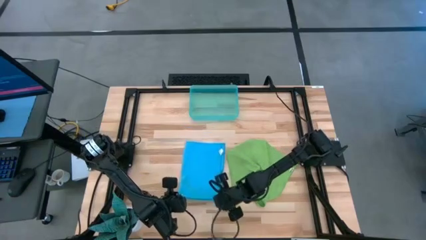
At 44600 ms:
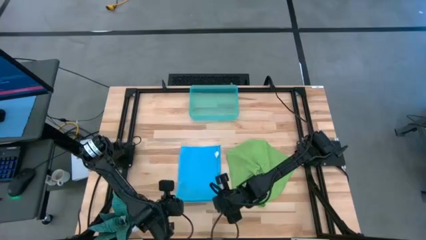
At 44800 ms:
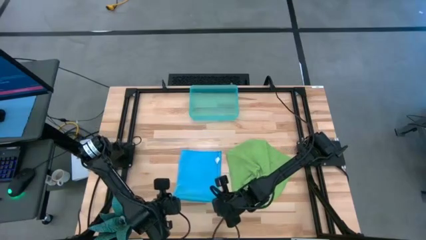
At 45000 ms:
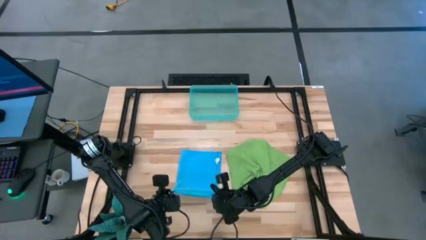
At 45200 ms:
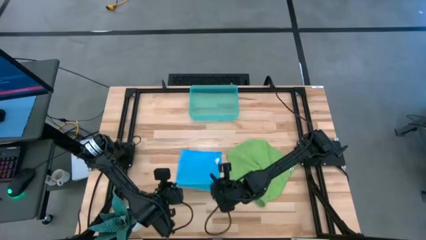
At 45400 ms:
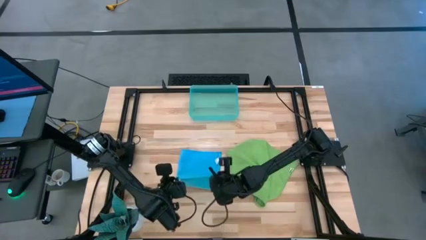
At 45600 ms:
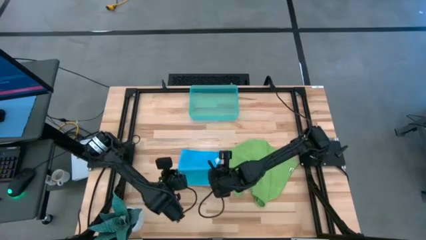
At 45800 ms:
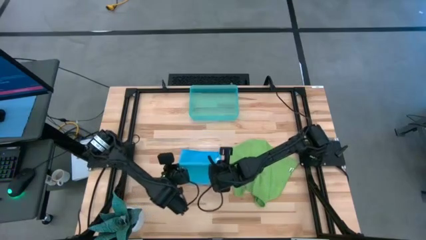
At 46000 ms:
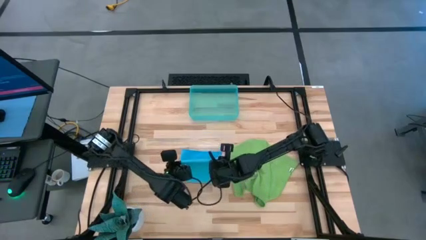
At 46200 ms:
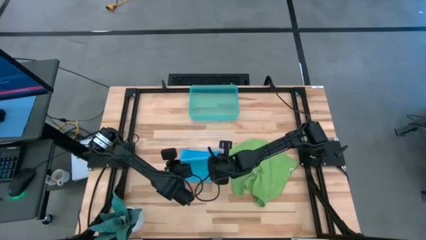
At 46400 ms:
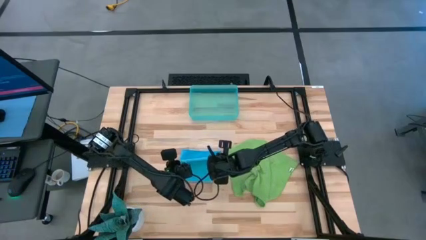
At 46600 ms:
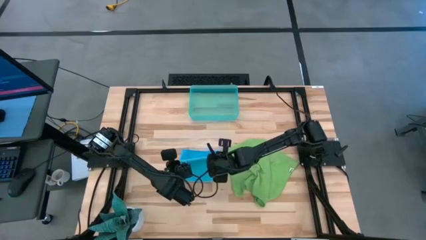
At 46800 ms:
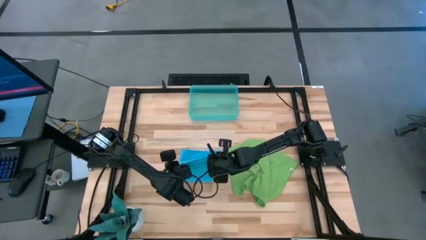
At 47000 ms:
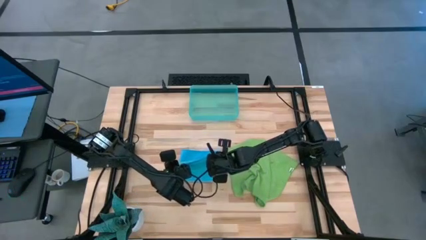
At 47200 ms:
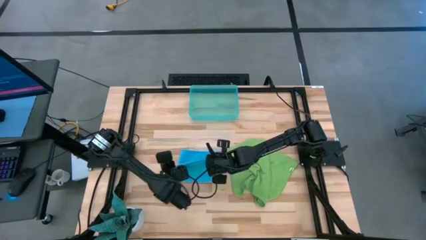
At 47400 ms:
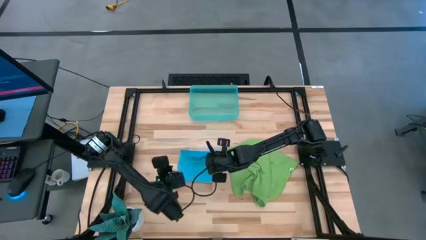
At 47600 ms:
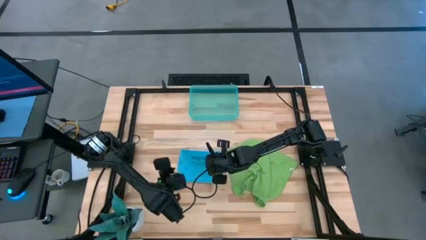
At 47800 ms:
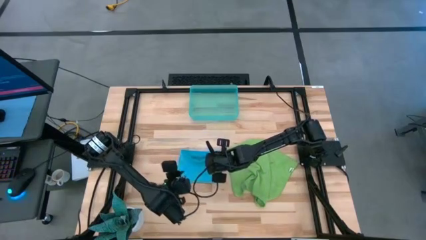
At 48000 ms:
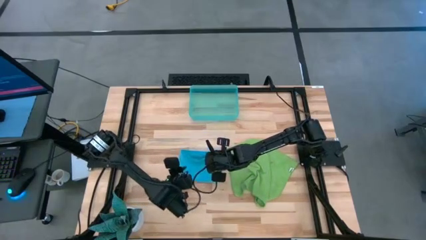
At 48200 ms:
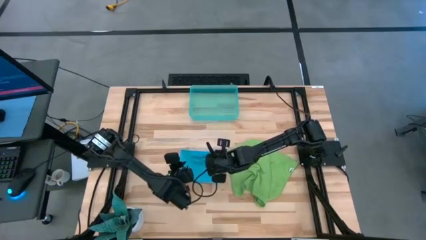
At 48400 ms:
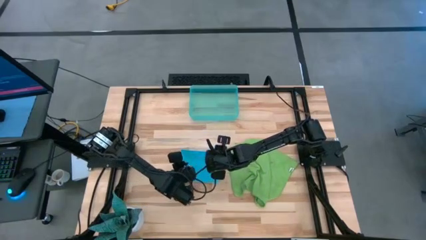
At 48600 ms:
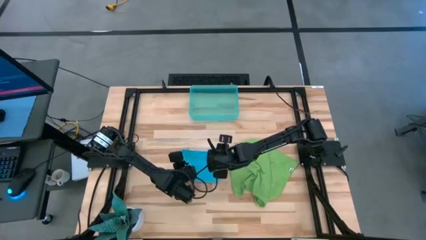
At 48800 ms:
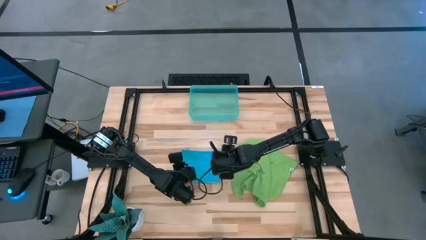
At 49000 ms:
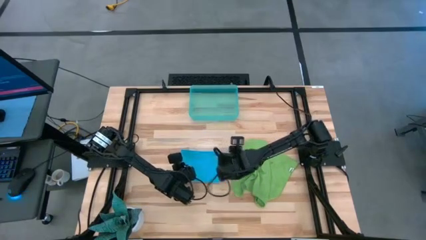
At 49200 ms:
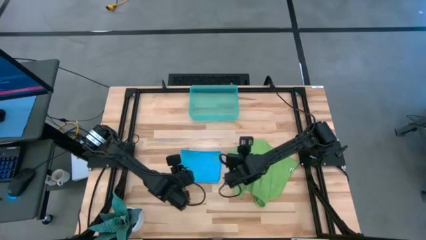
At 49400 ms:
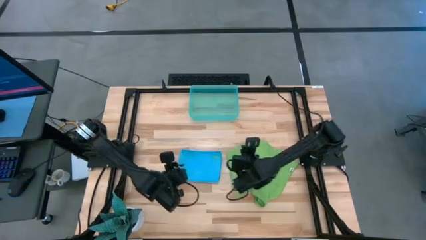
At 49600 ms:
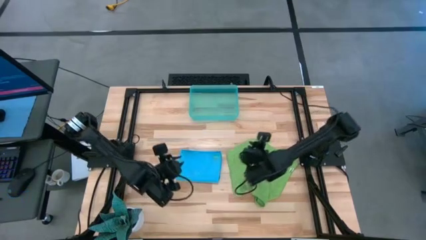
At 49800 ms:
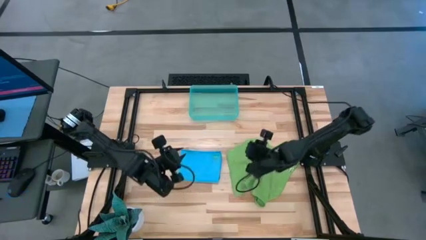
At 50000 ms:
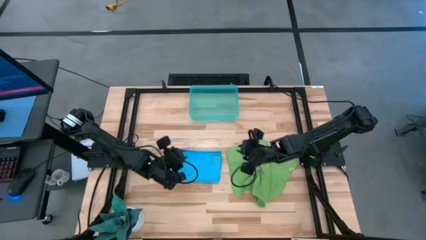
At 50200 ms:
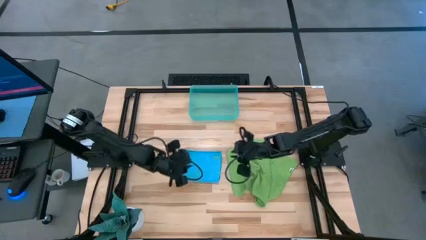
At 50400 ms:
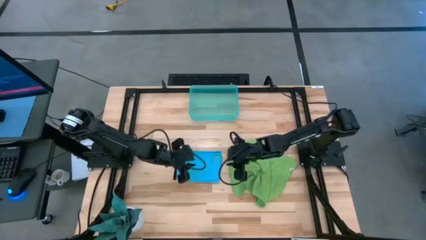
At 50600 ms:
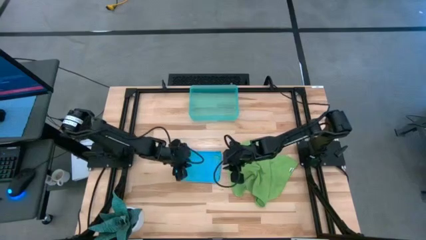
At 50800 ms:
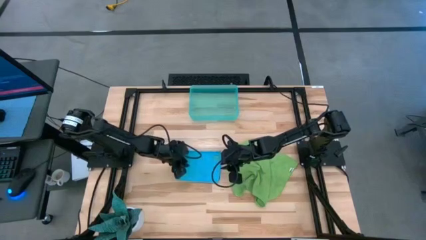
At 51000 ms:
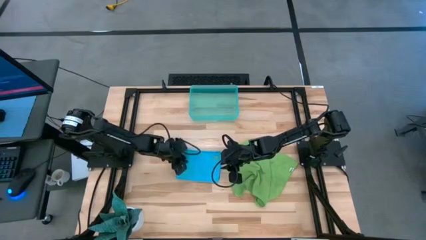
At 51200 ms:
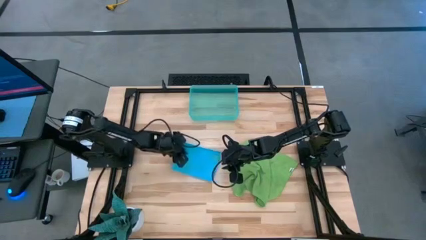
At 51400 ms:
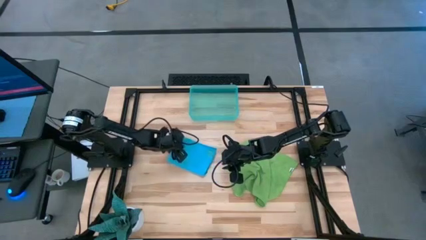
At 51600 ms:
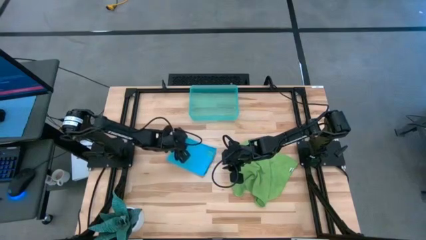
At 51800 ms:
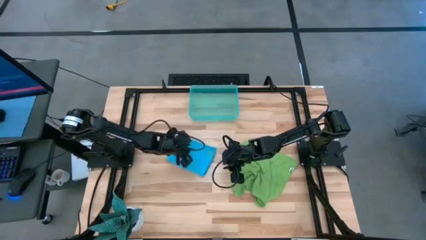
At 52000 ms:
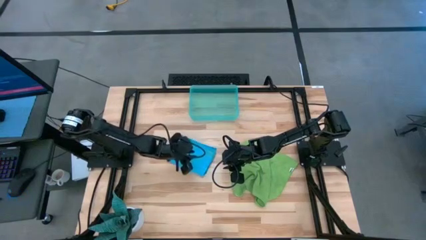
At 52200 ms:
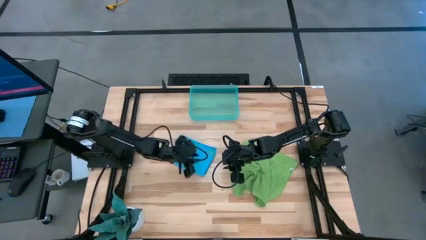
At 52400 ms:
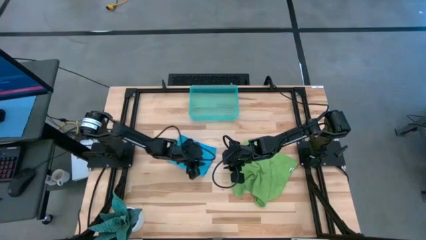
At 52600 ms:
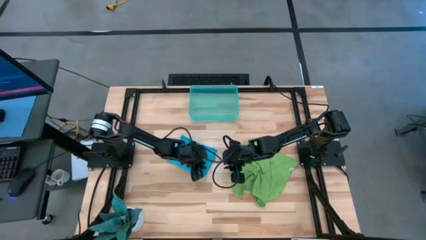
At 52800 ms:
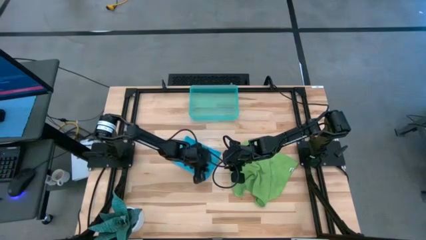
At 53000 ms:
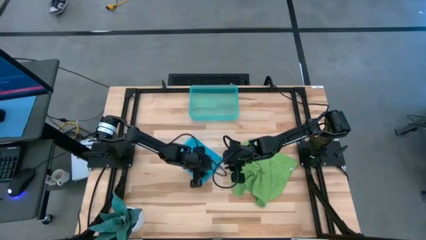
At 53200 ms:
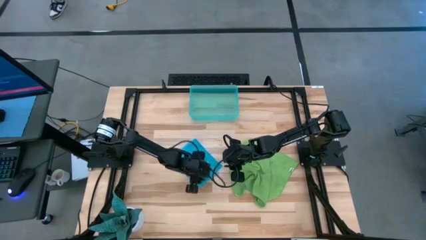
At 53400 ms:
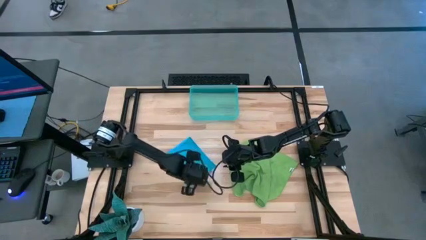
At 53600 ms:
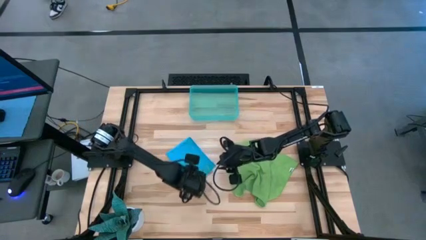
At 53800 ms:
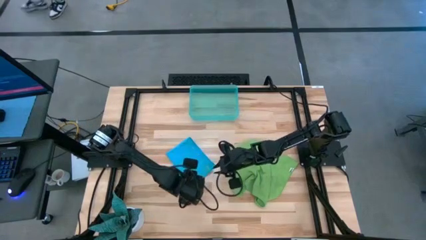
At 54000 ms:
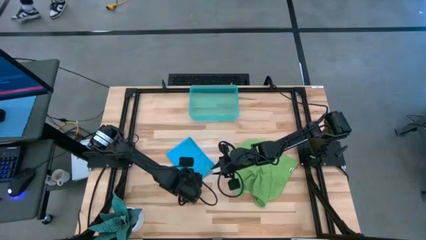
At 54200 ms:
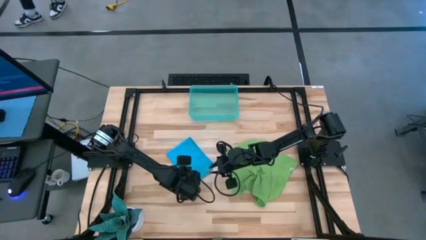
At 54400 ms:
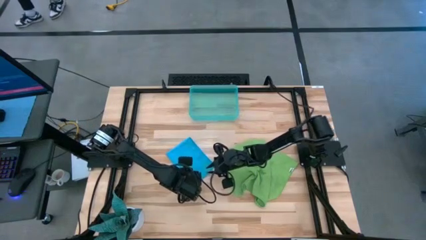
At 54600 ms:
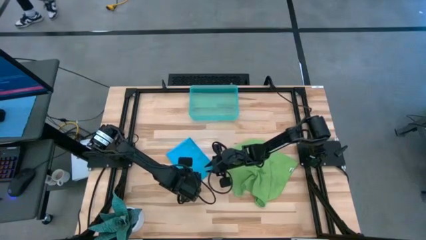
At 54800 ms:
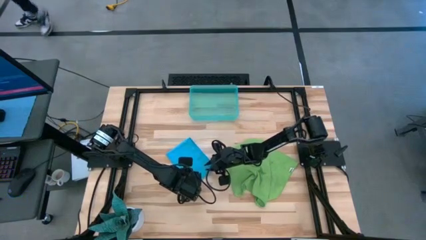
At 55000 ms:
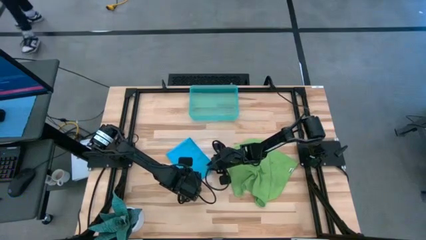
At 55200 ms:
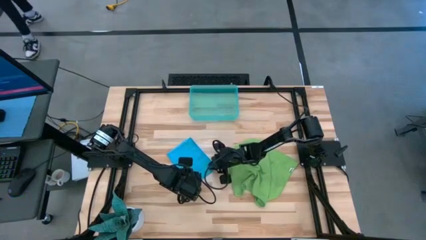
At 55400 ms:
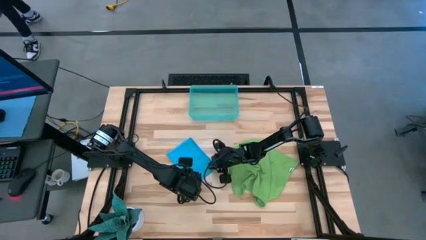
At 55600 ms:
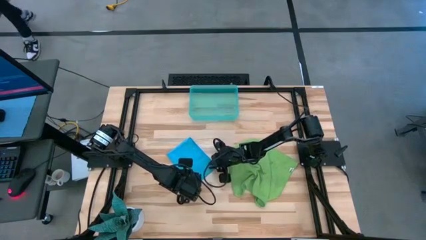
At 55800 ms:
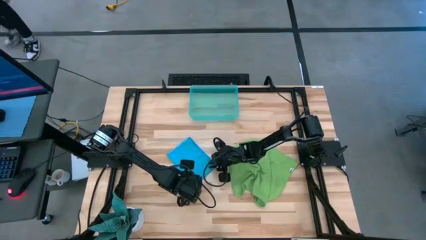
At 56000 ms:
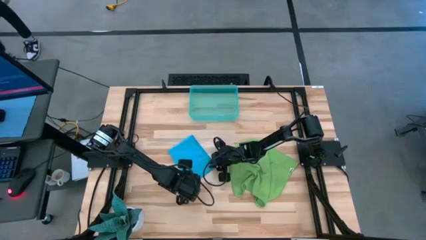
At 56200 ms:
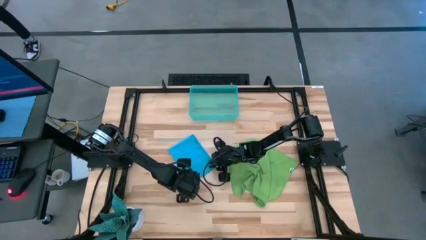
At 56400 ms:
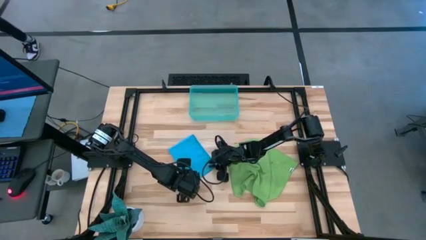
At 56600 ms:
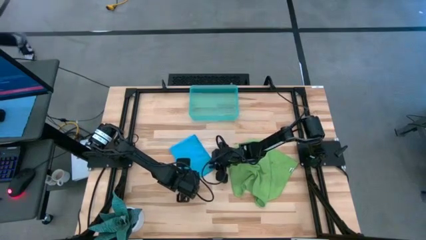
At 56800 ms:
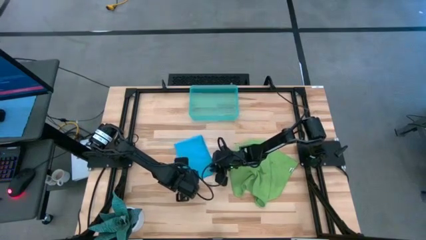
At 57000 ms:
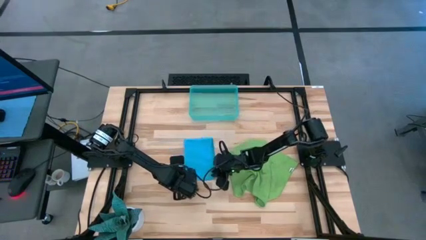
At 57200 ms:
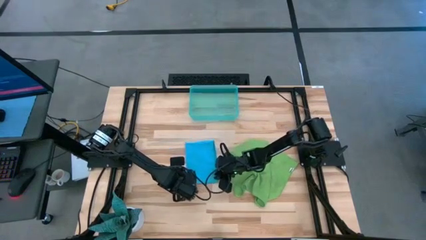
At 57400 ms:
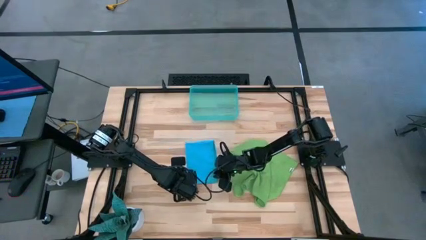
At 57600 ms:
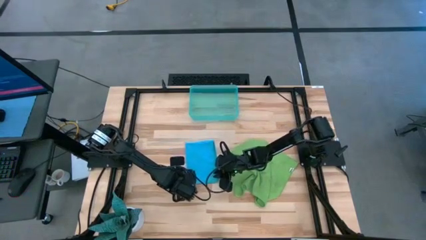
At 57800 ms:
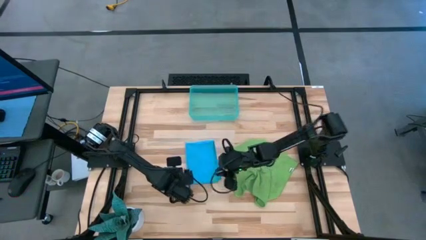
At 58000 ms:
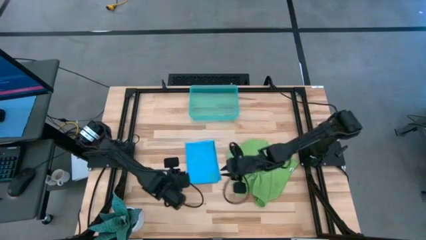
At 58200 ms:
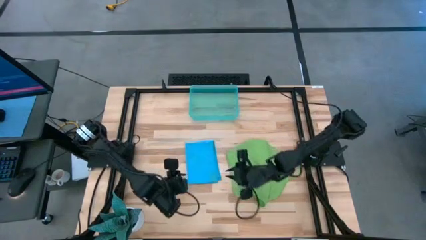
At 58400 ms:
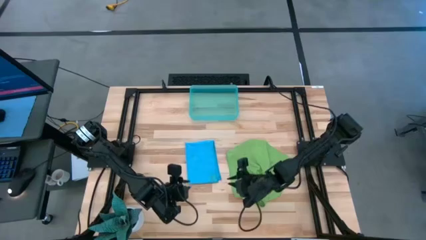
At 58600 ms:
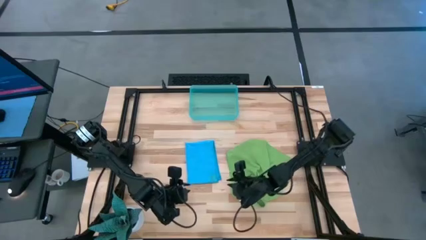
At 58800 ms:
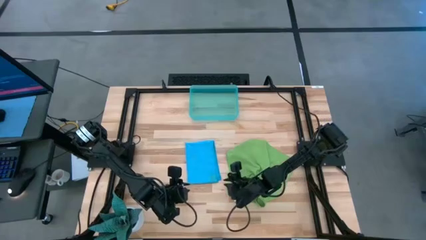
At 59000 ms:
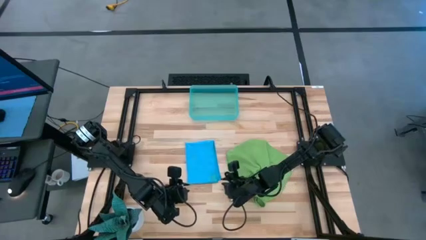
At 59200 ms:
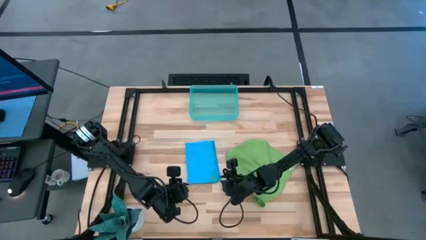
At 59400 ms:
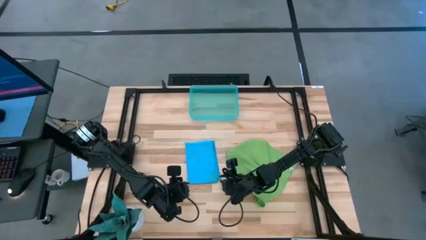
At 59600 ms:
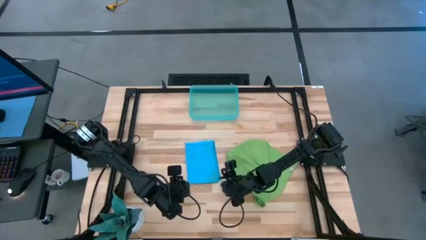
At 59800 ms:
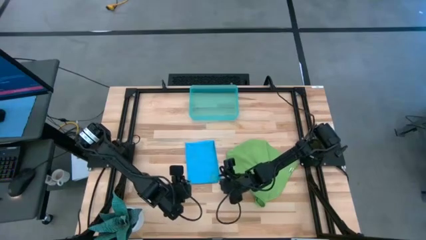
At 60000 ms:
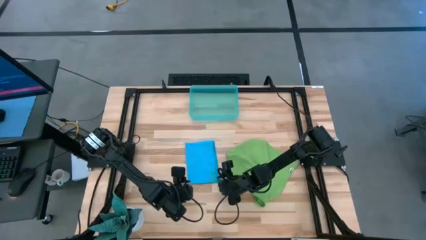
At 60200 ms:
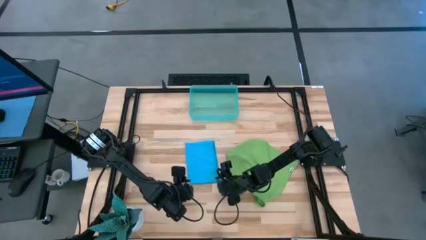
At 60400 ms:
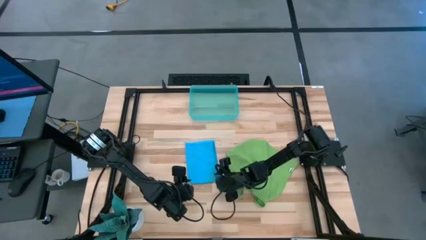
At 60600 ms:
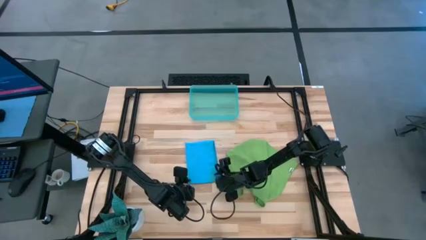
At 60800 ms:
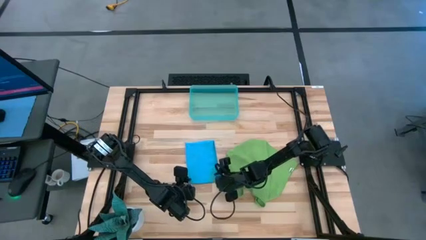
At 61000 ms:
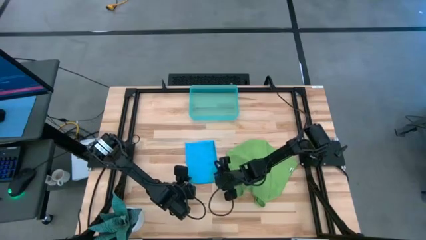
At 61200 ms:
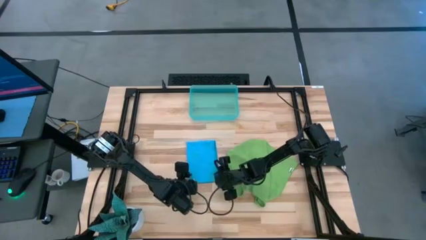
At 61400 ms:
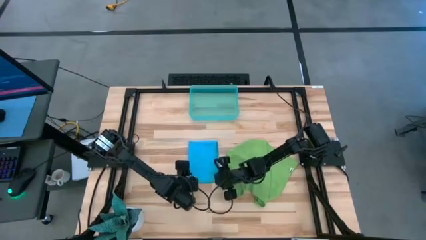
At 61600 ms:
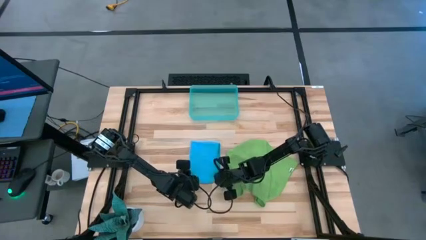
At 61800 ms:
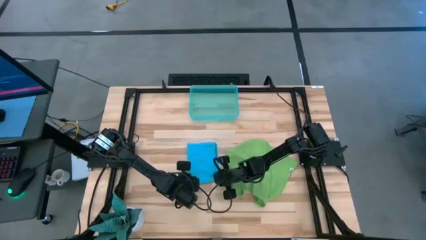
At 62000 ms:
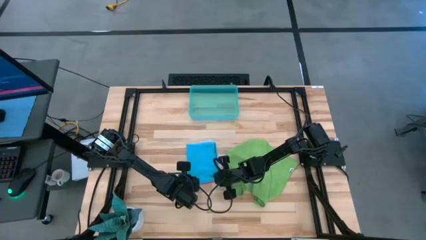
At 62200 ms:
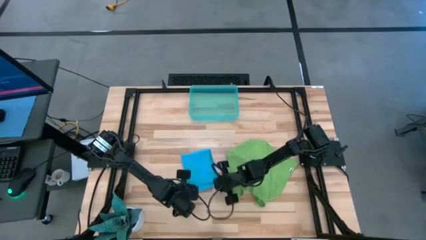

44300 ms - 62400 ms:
Task: Roll microfiber towels into tight, uniform cylinder then place into a basket
Roll the blue microfiber cloth
